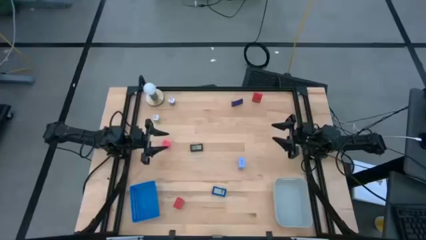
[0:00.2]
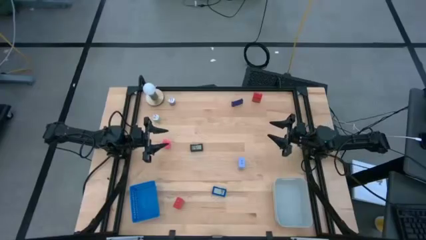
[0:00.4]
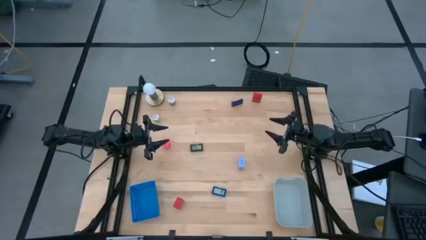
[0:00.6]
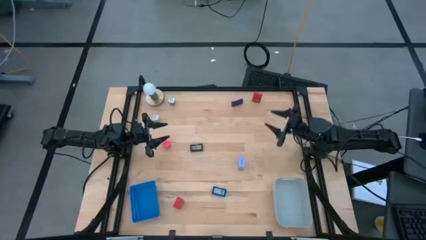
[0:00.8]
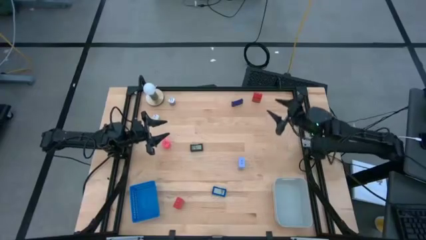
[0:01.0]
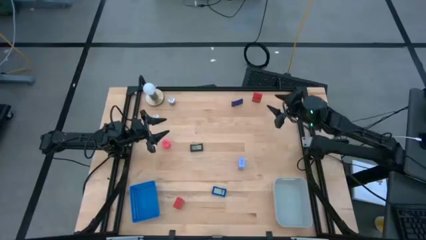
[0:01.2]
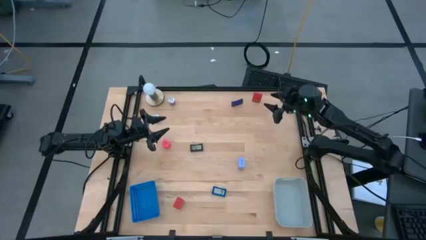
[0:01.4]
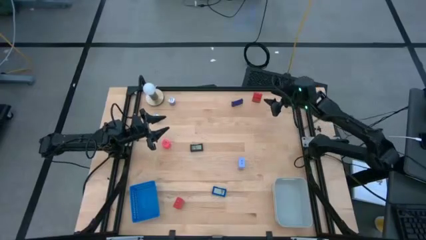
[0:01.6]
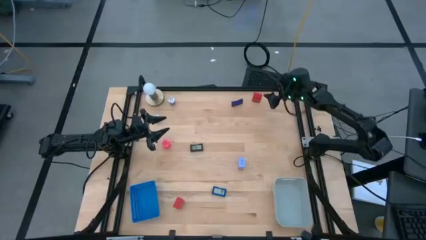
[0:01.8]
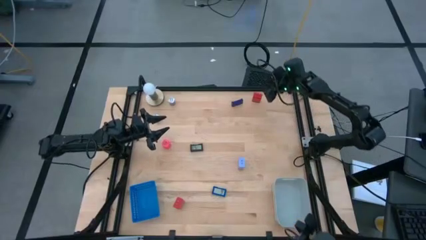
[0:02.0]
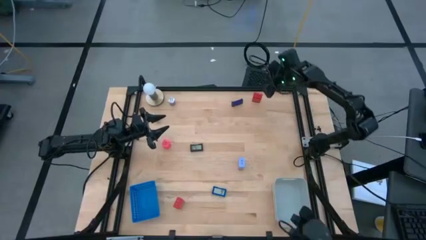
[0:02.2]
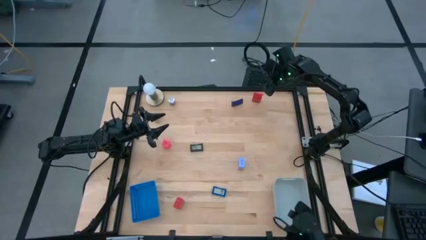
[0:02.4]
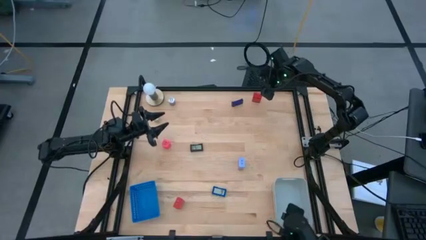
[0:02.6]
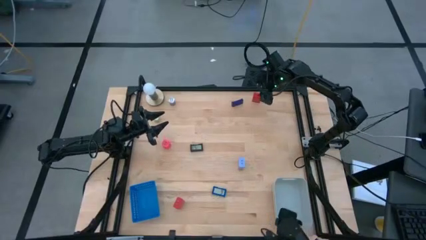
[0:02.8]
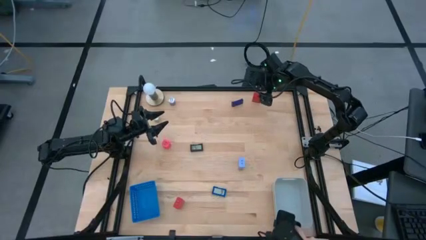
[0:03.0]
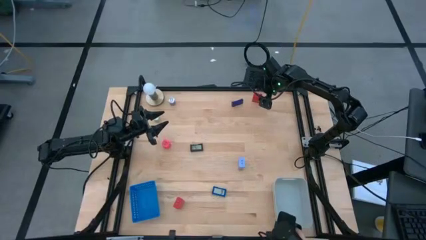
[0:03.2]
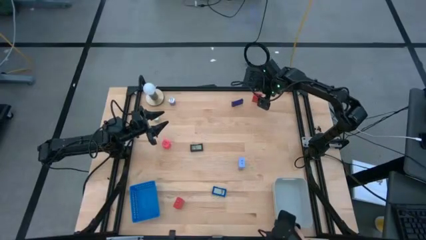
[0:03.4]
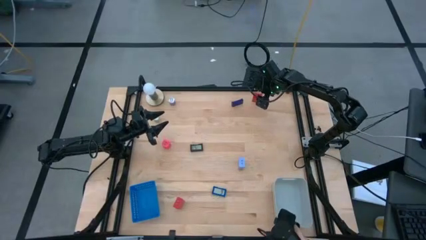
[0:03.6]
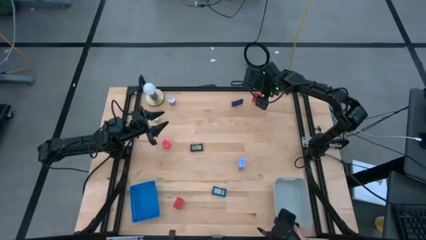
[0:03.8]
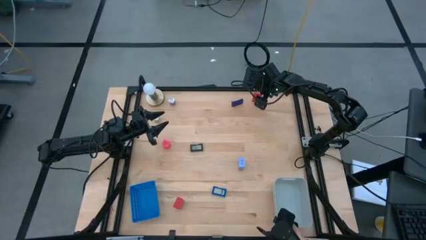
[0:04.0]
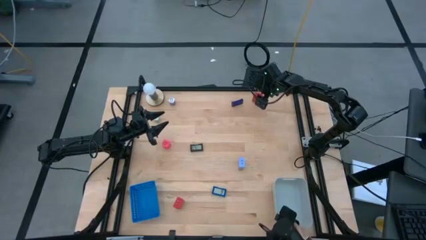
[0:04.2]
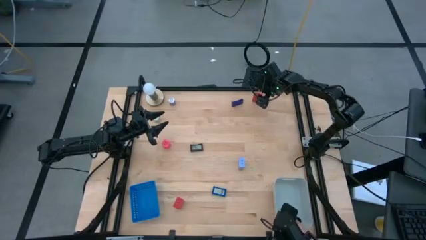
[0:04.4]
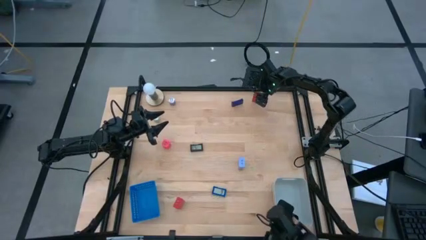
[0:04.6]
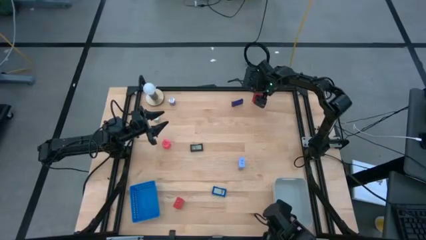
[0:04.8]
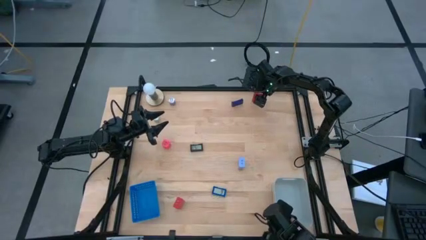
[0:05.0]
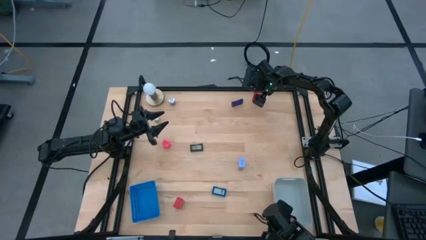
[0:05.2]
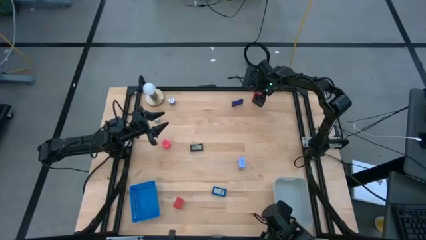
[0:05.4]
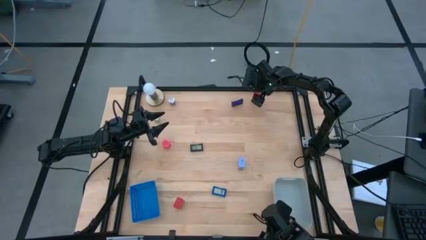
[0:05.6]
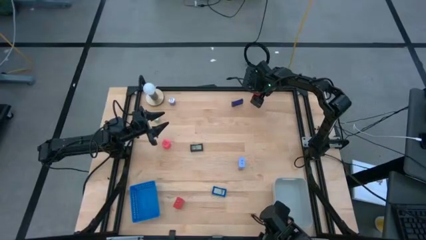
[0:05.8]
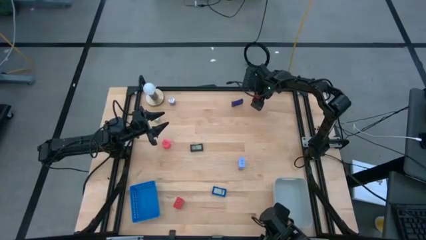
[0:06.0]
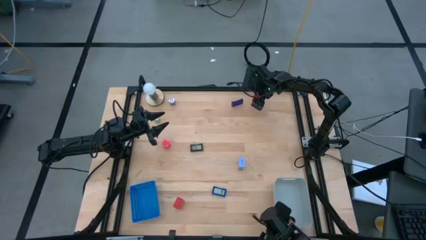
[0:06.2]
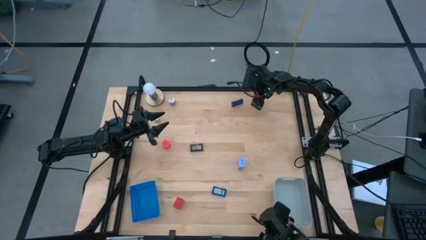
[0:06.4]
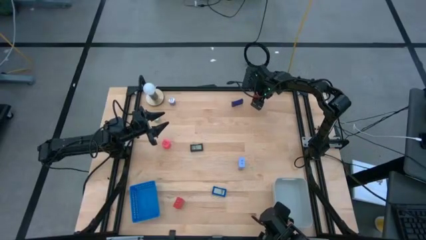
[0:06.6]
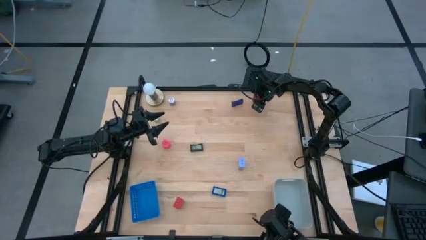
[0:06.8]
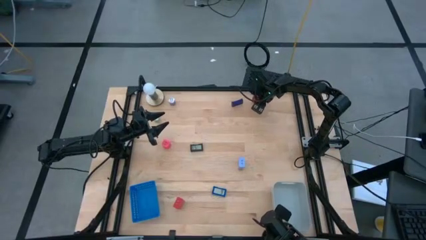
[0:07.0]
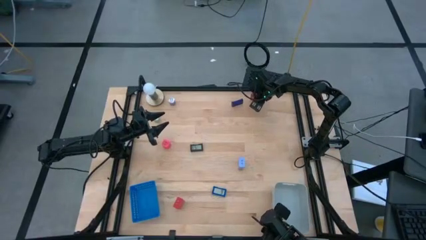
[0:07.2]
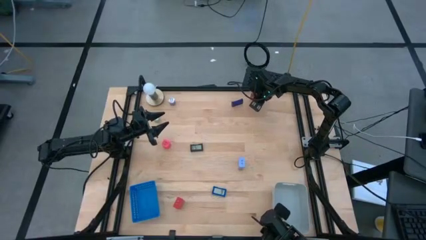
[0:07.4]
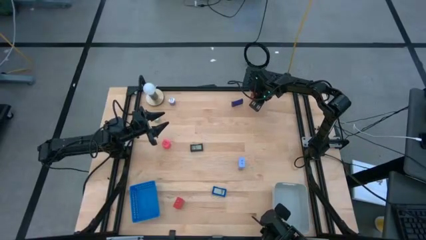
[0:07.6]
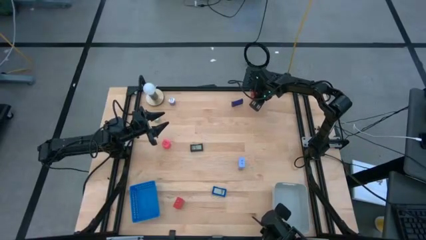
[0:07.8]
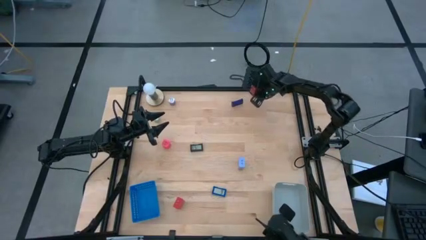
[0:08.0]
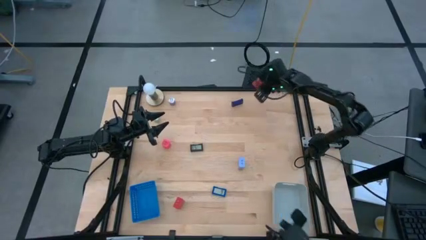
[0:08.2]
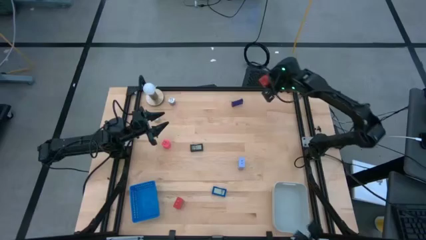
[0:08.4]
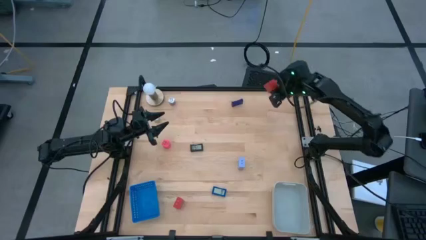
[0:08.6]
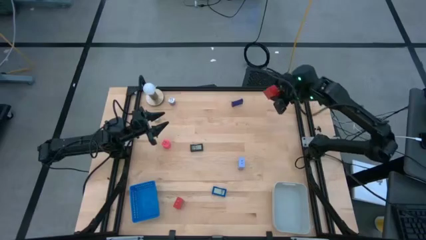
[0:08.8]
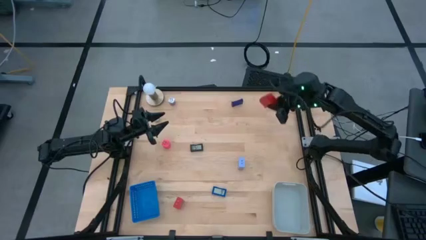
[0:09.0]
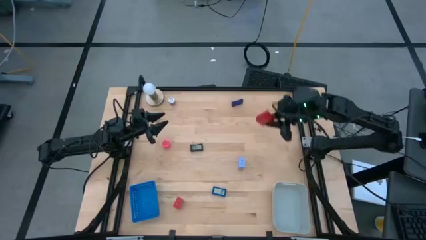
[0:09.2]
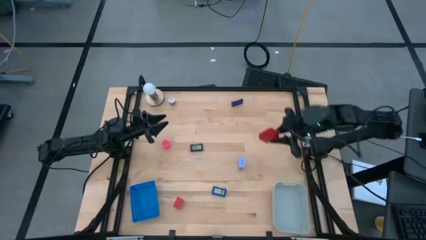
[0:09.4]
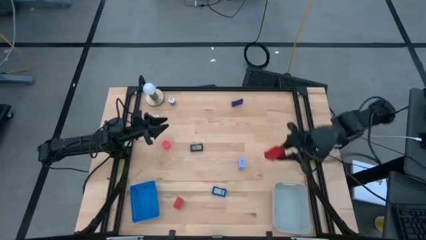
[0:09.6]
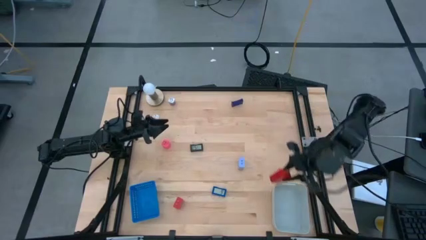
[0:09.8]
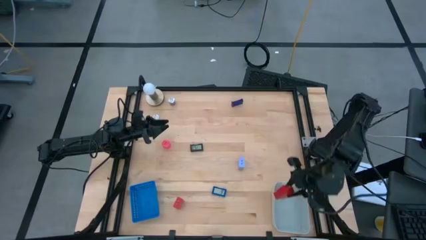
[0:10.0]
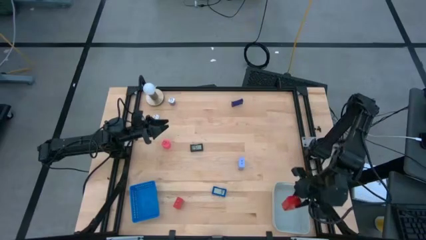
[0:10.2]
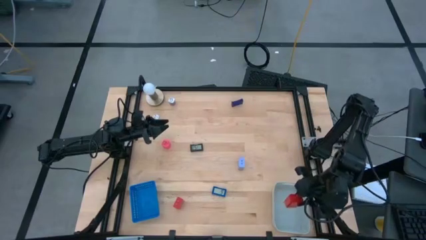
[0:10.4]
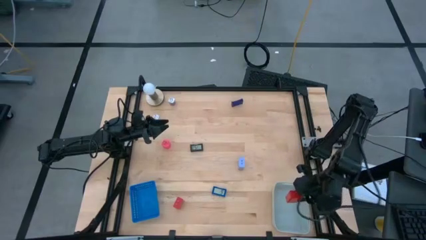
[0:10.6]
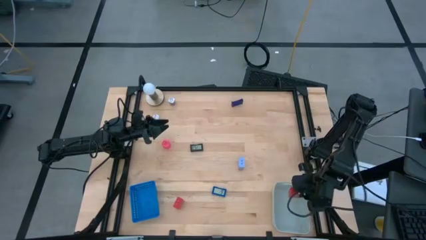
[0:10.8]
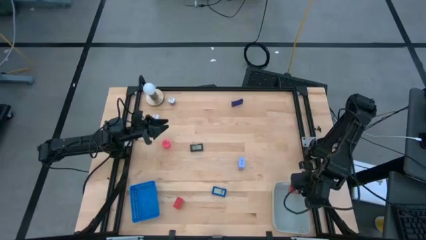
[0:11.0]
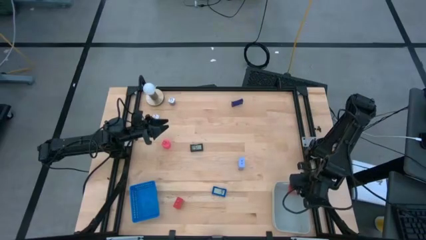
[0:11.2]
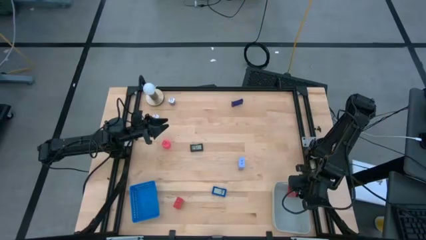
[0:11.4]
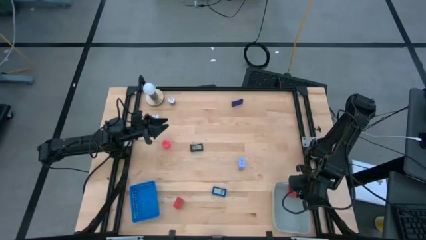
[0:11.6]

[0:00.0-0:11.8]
Task: Pick & Place Office items
Put the top red charger adapter into the gray bin
